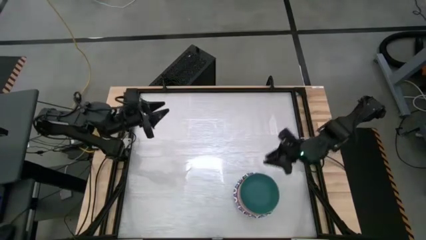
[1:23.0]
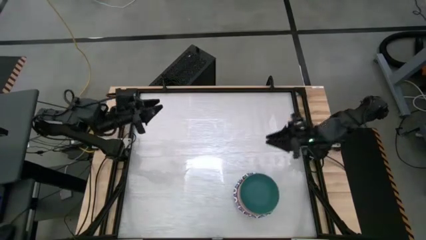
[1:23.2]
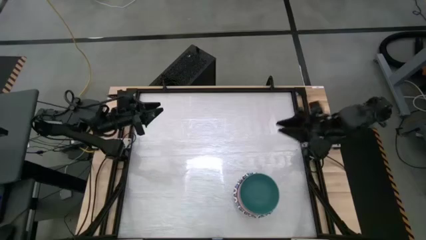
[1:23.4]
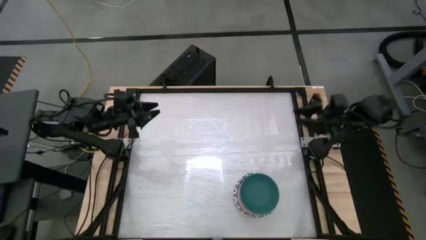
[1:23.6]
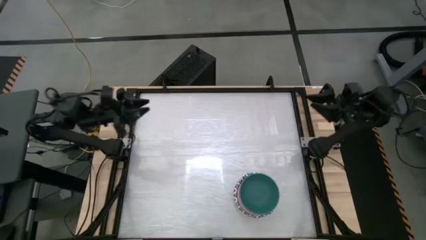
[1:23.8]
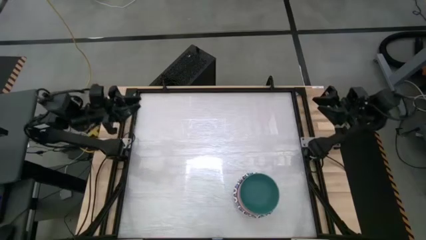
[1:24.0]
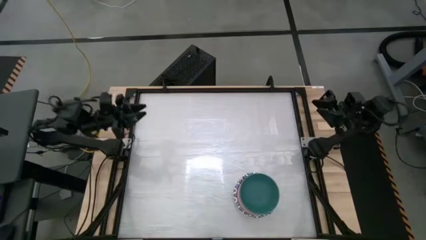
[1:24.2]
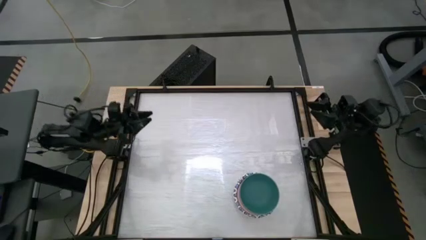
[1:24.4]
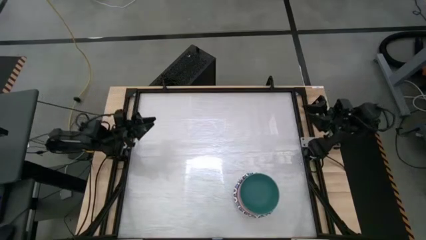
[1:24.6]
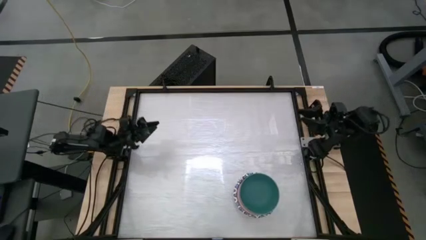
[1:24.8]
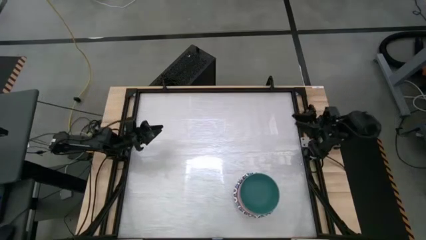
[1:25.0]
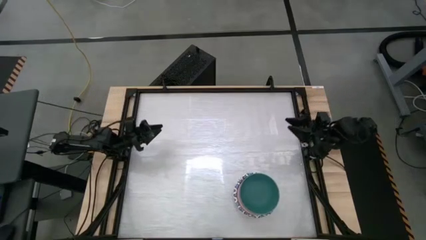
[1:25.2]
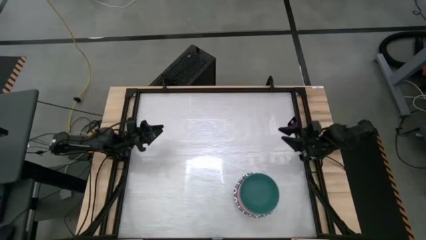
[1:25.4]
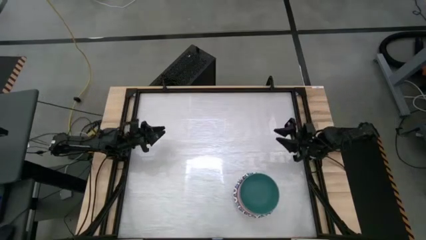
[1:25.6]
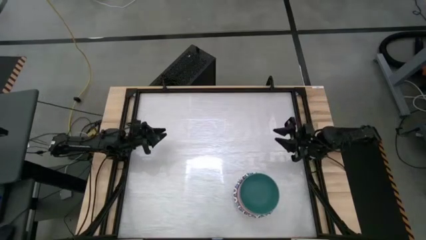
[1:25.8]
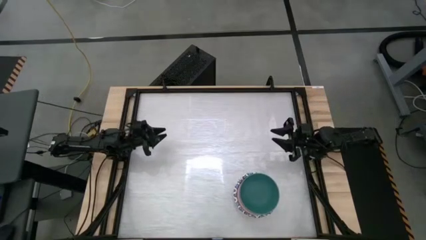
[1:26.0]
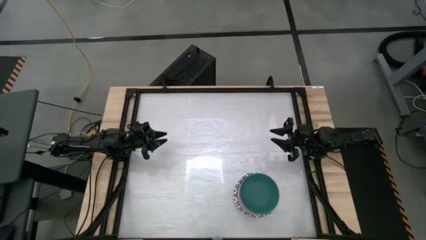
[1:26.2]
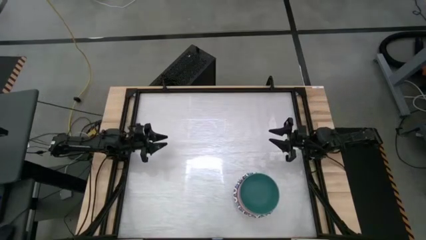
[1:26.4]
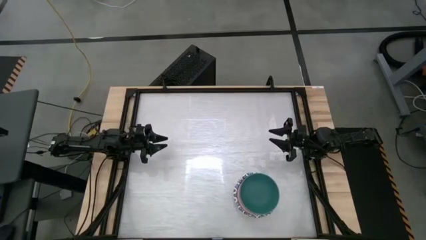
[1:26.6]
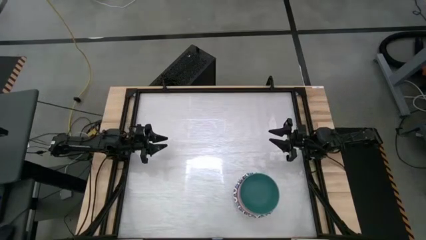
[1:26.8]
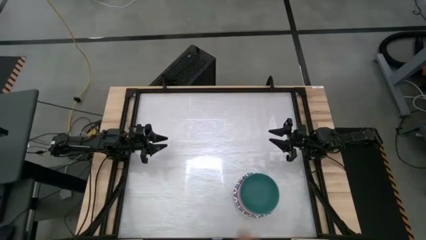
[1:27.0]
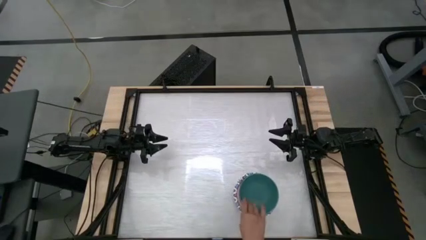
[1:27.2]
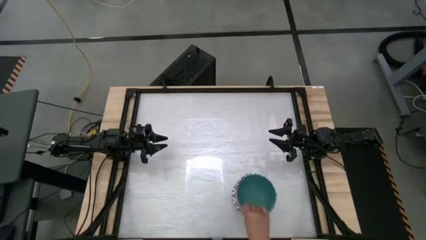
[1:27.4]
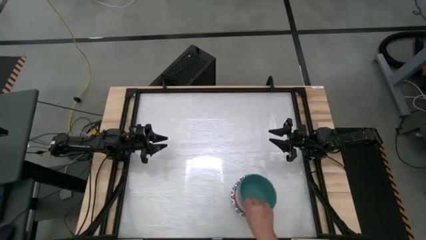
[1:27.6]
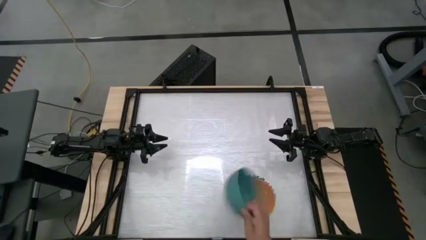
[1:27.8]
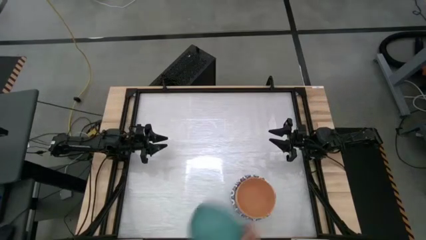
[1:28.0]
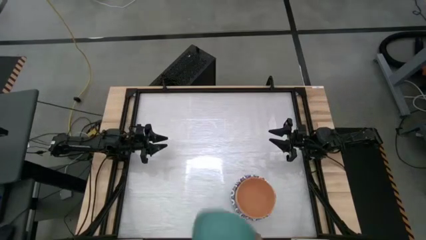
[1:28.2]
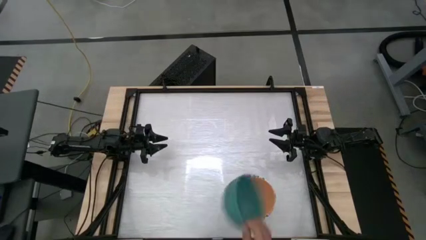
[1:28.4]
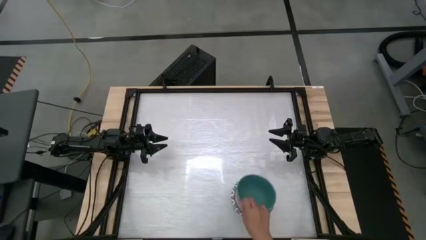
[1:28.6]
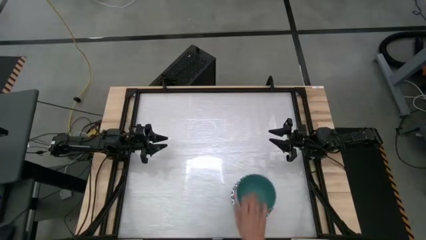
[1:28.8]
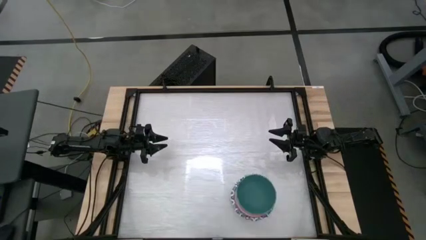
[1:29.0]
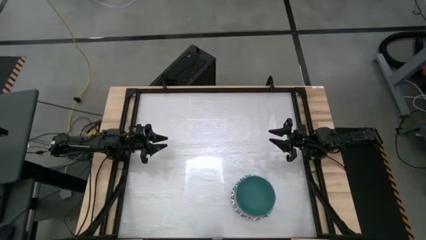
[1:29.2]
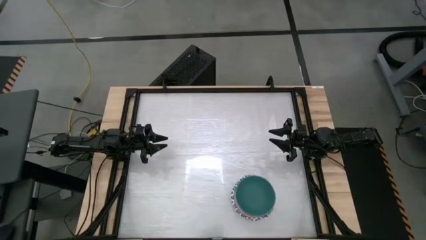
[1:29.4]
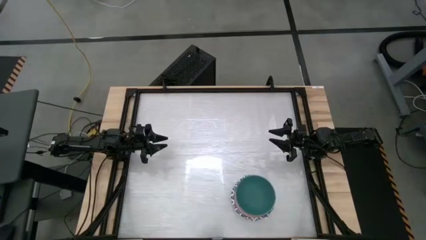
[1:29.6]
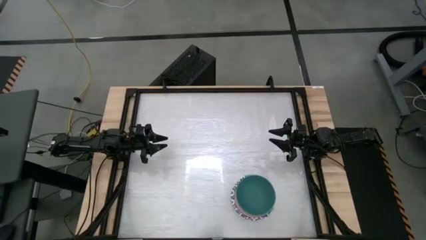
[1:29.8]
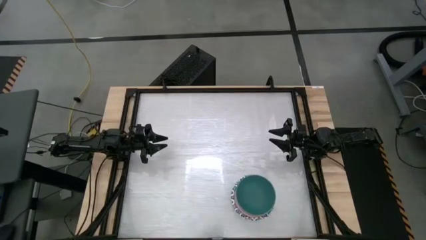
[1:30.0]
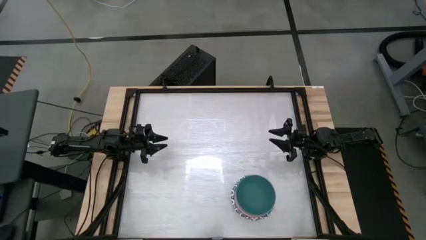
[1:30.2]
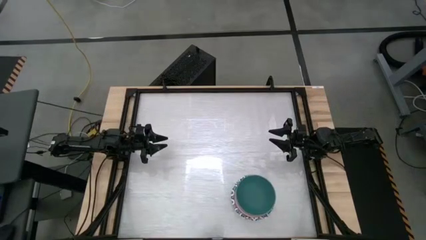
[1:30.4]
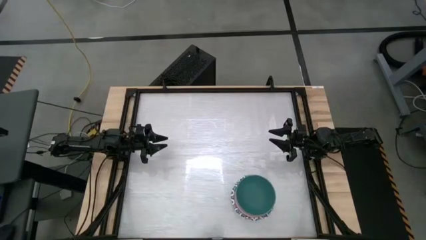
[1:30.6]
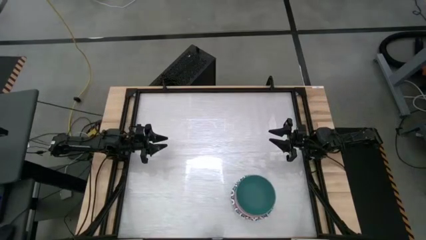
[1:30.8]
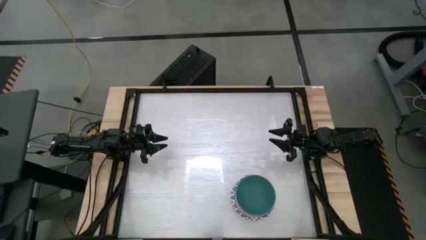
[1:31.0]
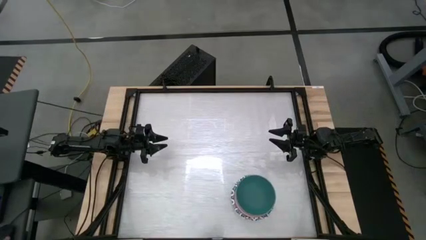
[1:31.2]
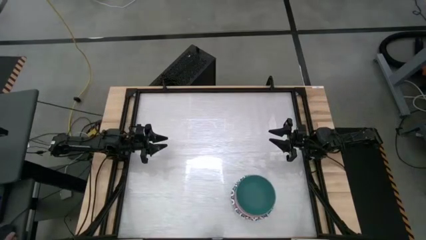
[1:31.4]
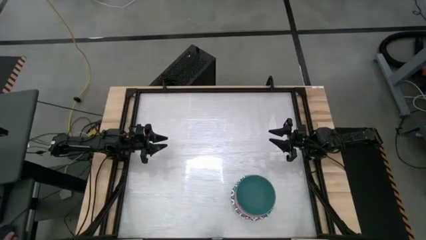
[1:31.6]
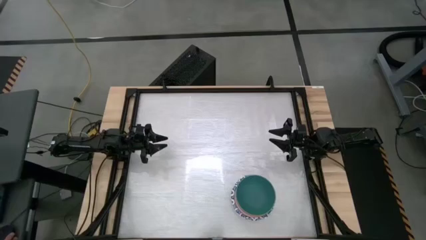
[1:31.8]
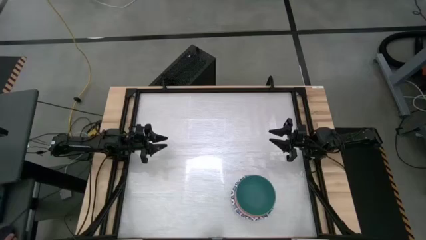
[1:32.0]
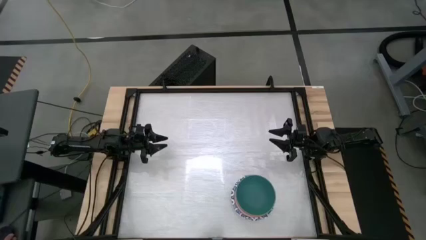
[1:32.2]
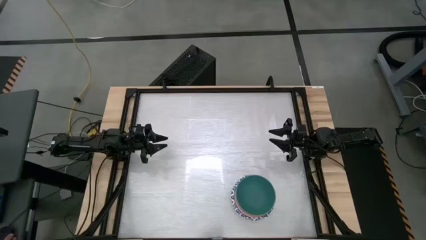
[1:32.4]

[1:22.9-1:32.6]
Return to Home Position
